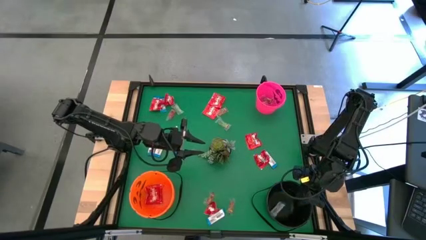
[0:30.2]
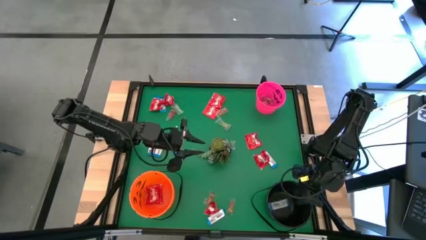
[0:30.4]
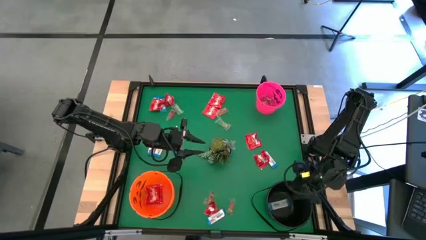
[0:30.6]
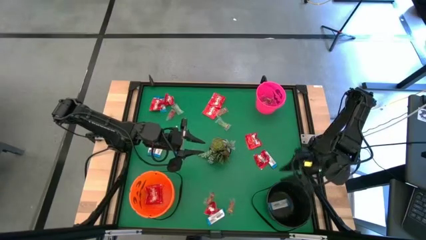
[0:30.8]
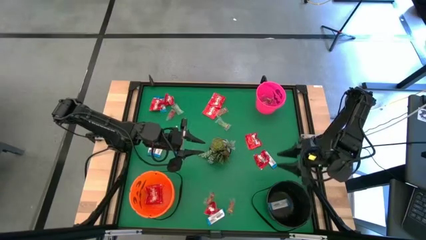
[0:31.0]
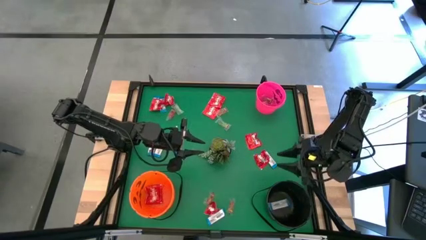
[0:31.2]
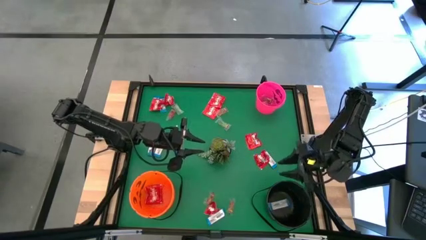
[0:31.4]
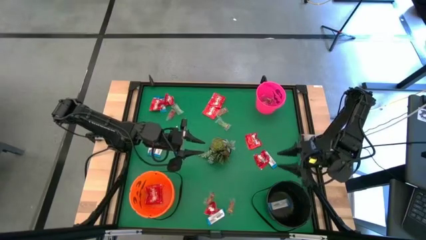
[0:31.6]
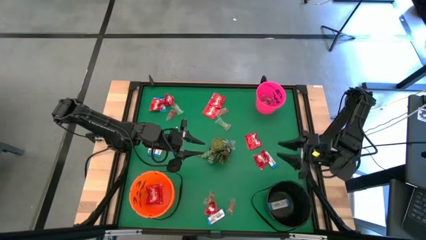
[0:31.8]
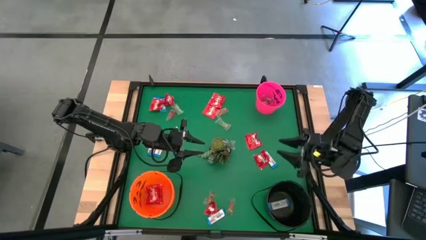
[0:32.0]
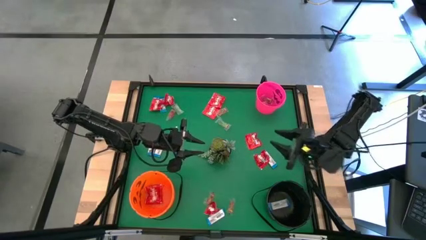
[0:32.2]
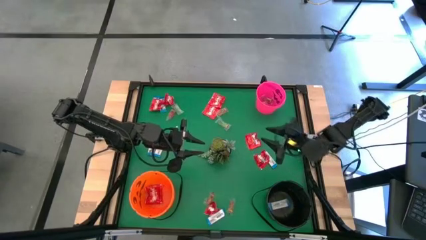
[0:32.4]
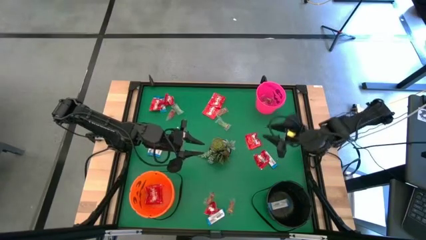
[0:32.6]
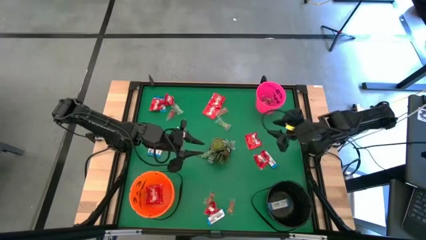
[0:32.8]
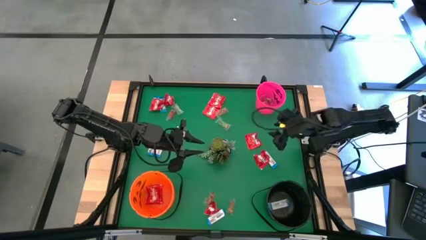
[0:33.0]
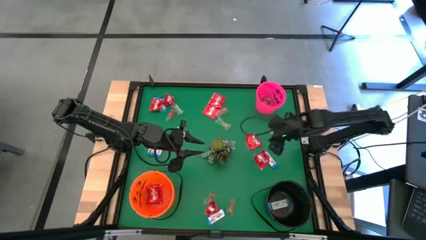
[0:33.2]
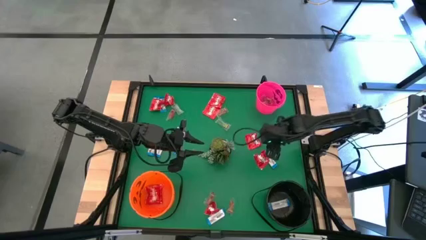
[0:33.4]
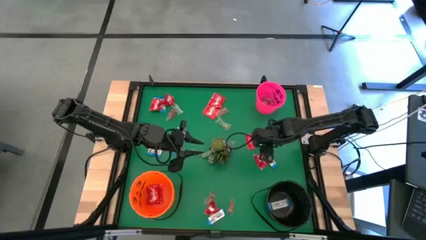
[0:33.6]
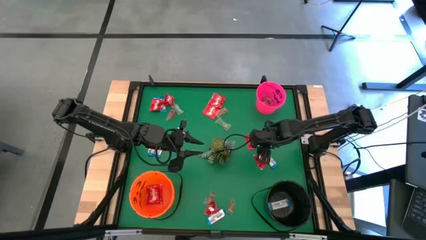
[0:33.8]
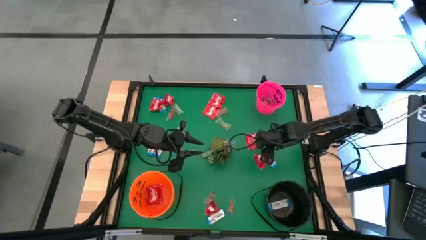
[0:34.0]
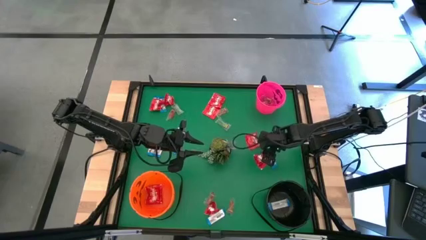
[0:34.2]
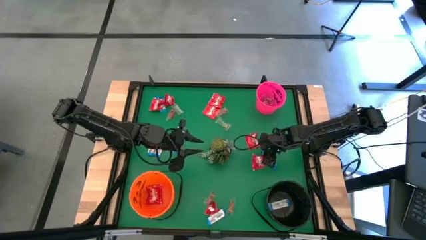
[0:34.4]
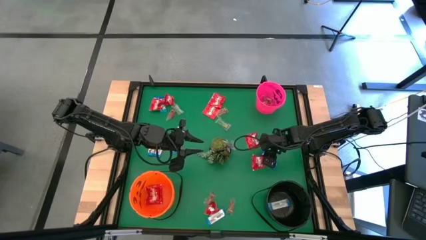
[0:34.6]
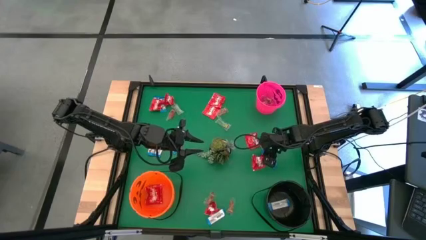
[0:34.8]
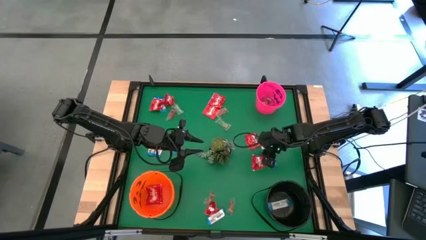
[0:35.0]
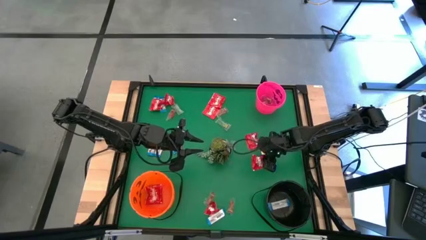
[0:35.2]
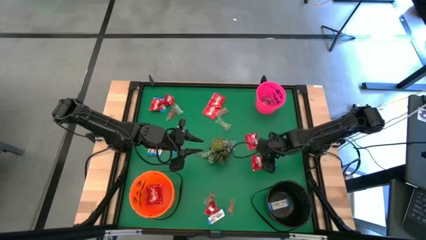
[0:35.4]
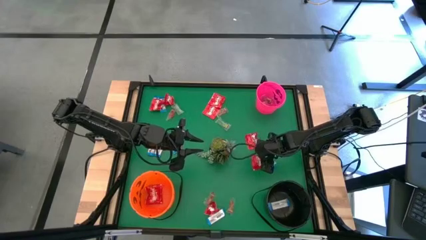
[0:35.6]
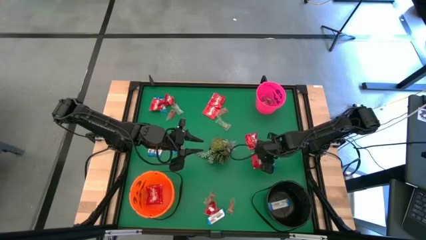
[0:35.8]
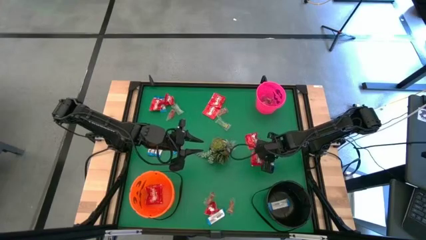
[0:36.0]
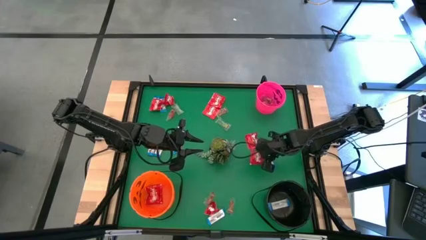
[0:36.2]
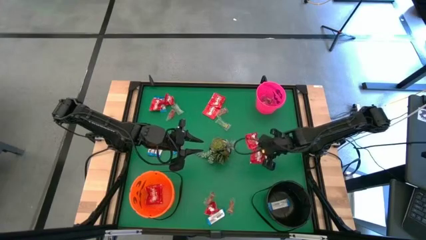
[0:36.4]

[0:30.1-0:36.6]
Task: Sort candy
Put the red candy into the orange bucket

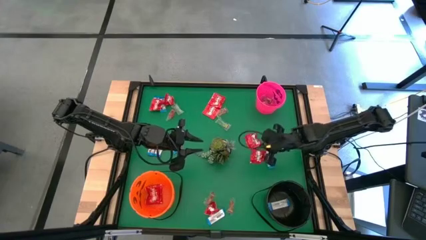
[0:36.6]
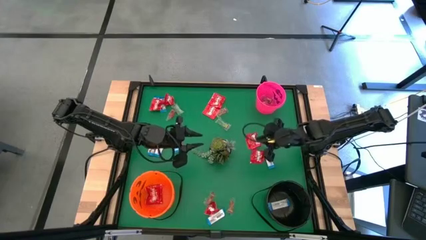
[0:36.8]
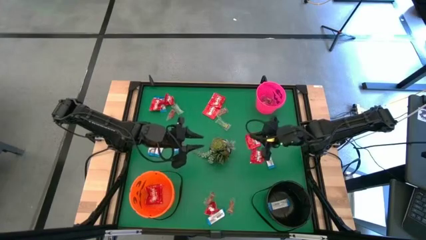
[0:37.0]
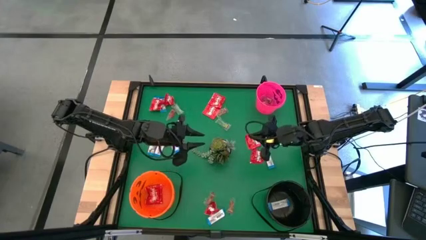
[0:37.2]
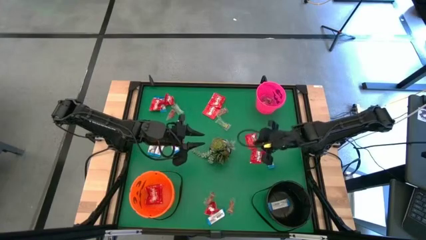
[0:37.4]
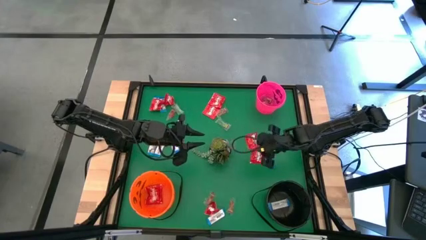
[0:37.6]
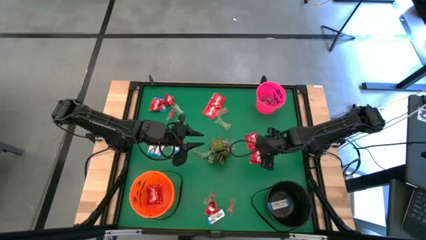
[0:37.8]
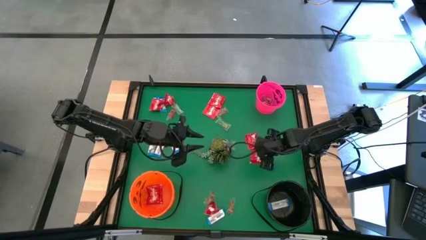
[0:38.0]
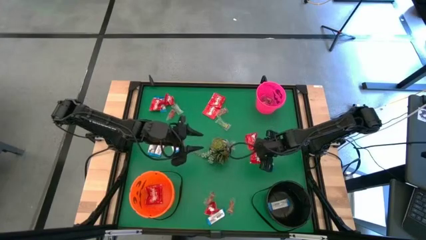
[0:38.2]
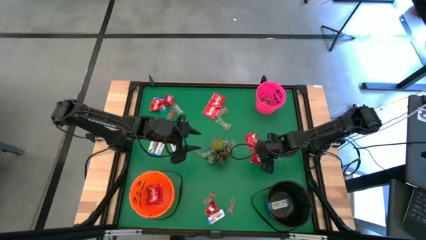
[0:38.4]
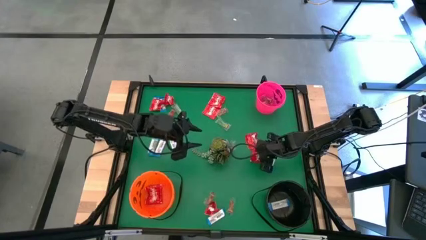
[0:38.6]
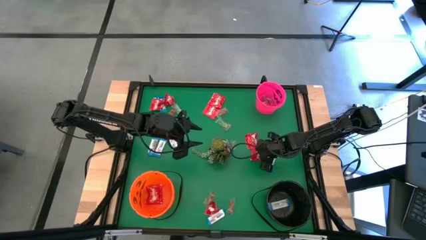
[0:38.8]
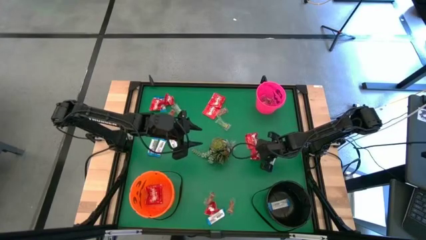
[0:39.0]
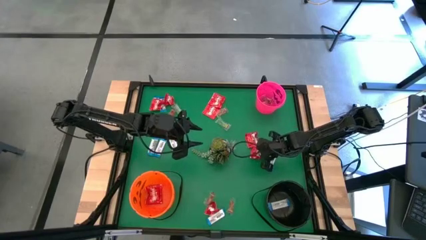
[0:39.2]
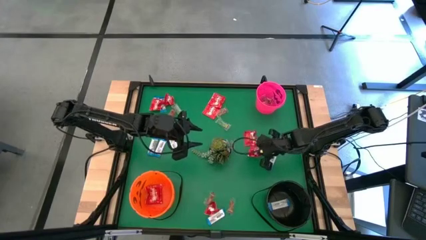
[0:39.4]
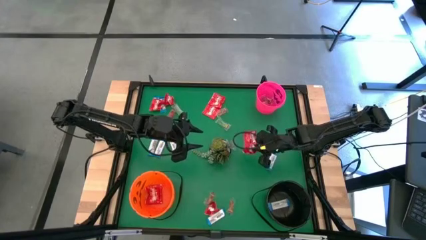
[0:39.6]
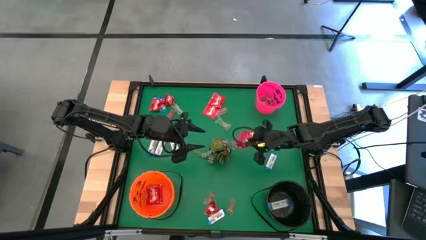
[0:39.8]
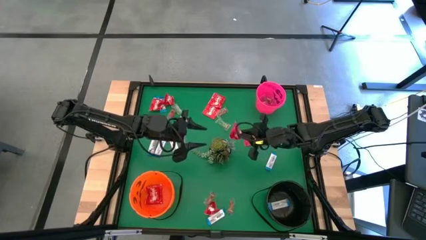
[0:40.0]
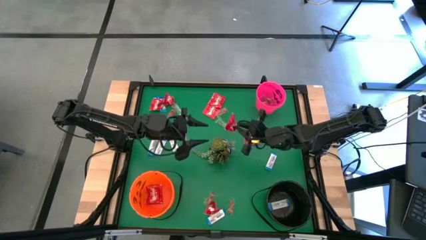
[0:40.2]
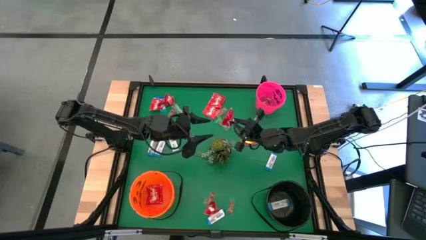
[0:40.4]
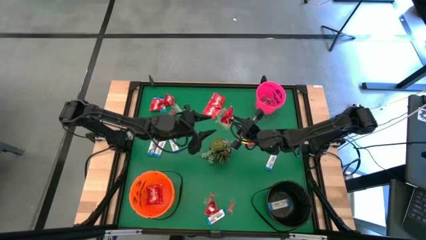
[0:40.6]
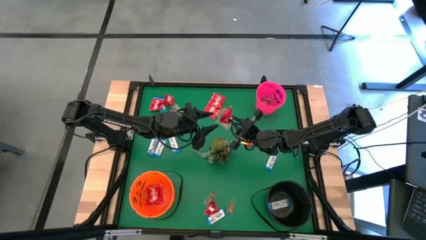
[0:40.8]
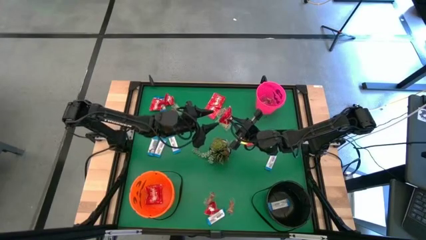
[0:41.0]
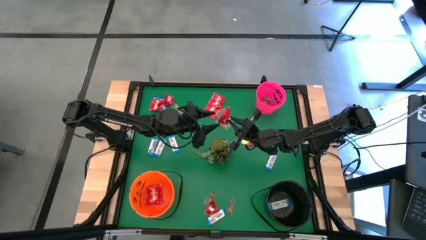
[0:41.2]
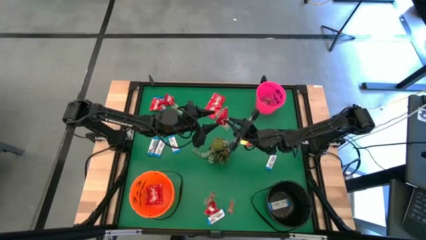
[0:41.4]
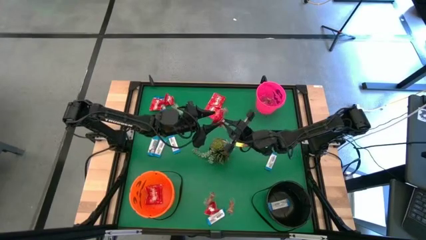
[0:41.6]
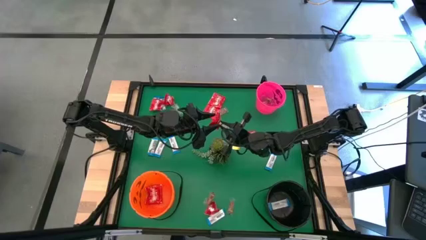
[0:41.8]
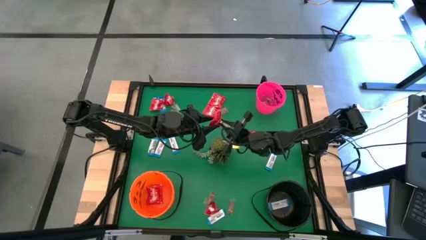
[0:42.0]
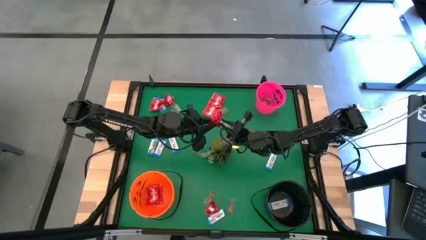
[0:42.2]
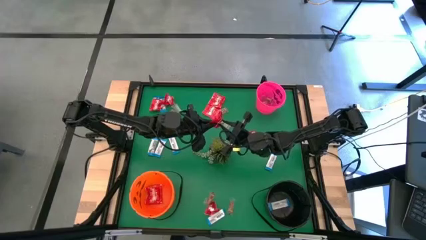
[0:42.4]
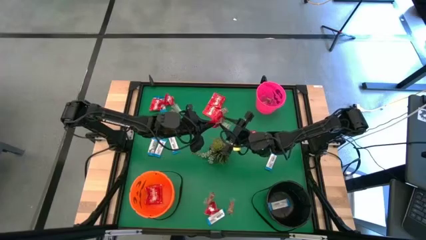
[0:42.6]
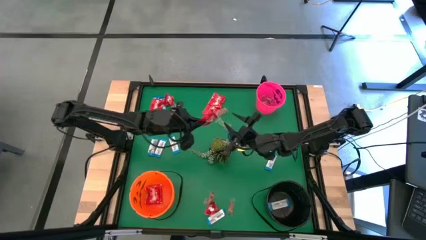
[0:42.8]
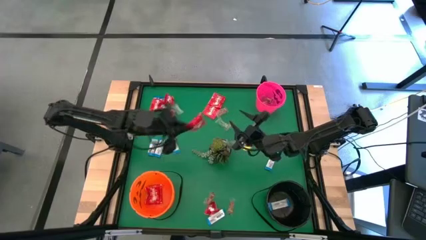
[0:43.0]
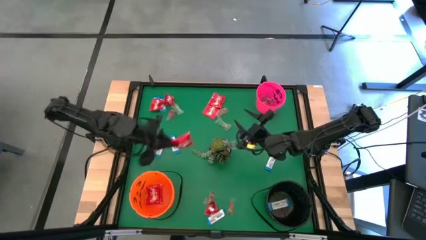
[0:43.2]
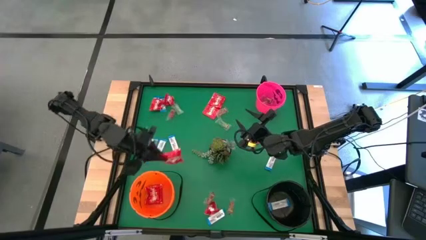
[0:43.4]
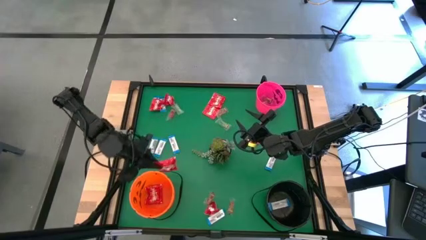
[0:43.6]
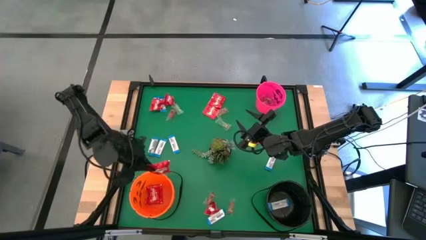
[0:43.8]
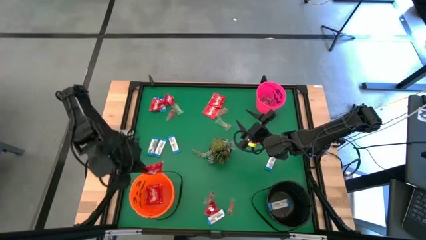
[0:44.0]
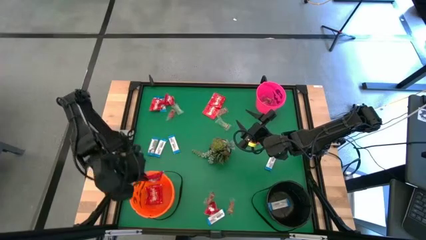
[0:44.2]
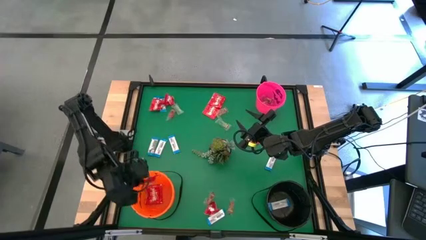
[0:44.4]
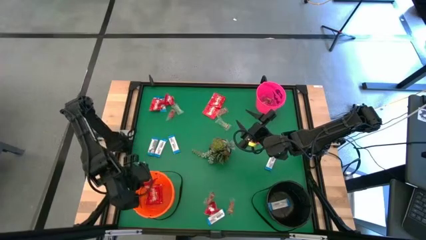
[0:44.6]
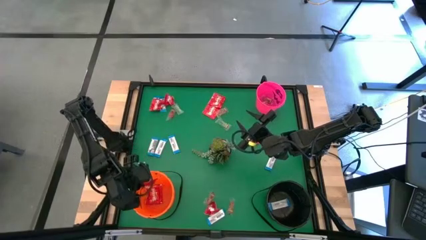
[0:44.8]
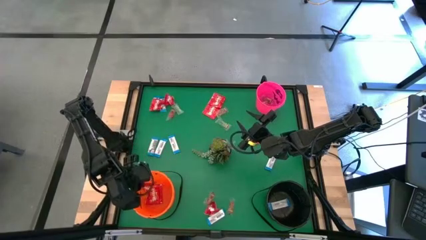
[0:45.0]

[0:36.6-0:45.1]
Put the red candy into the orange bucket

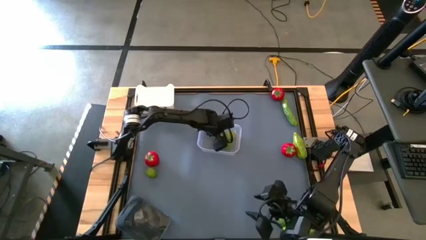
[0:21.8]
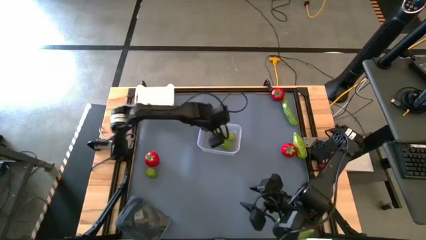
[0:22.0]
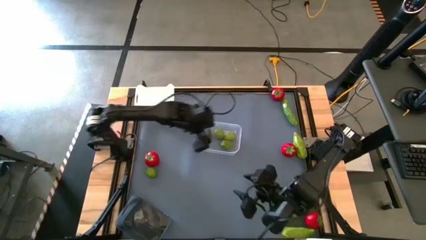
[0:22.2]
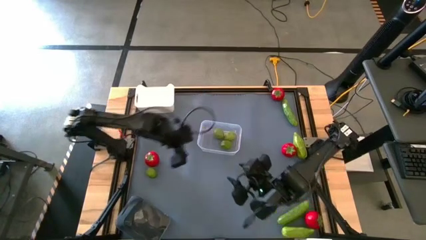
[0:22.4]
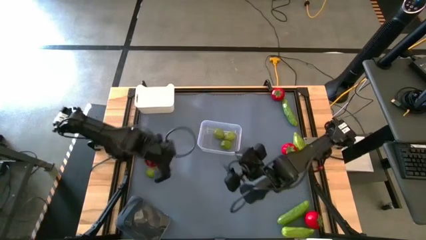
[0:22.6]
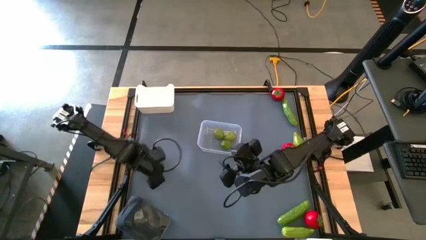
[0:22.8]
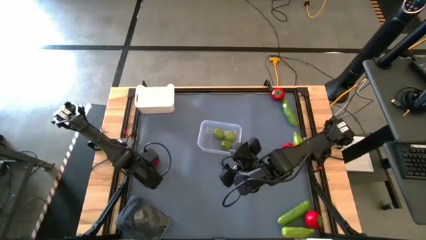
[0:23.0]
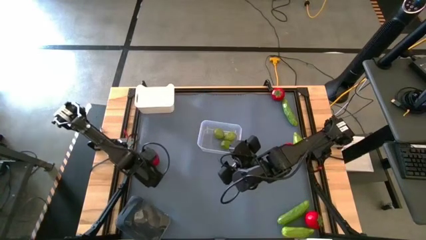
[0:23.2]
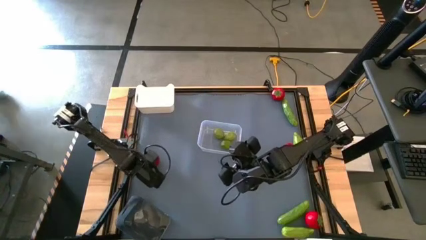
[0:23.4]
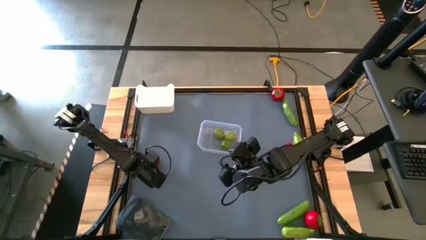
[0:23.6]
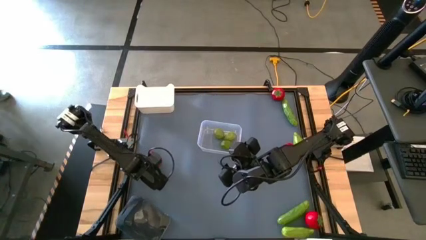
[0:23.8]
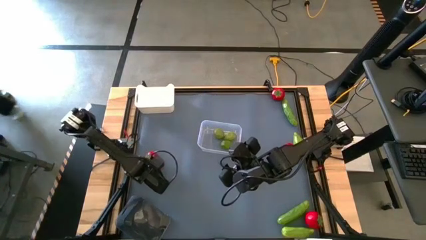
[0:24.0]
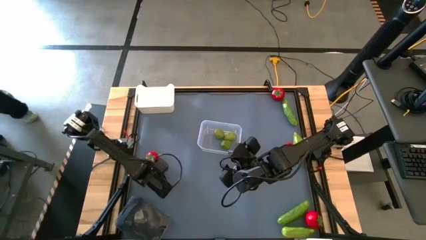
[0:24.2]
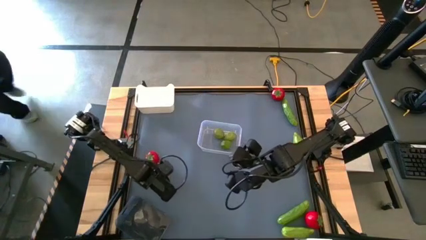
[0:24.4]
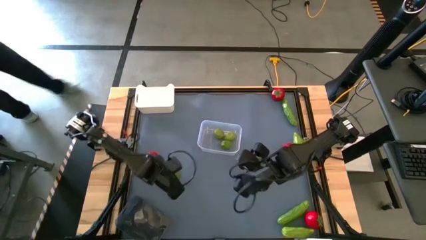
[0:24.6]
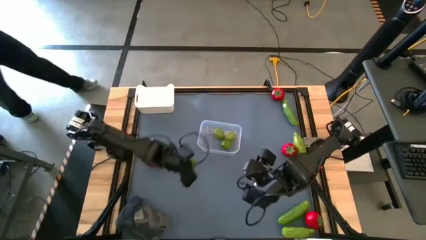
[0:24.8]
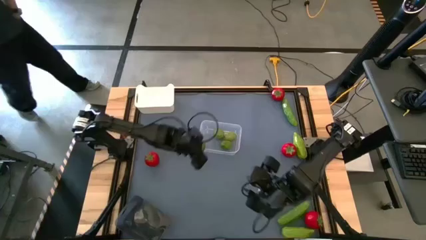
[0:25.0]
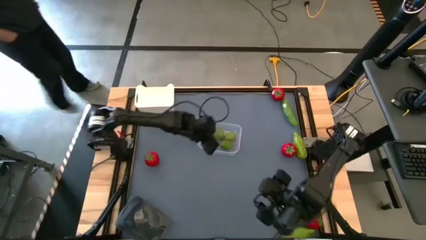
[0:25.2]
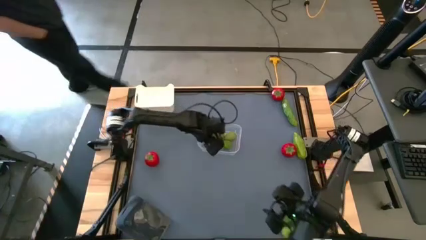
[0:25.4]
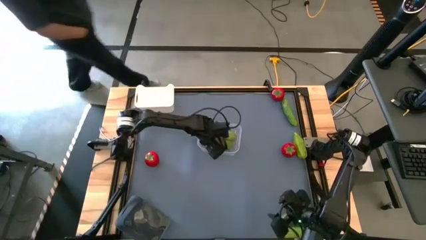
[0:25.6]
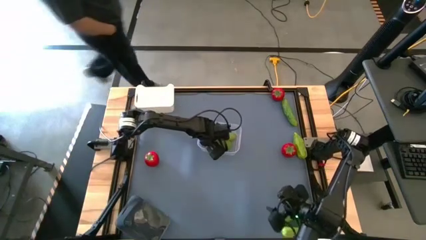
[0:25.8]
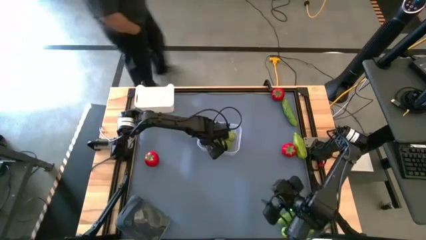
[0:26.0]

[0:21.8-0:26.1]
Task: Sort produce into baskets
Put the lemon into the transparent bin
